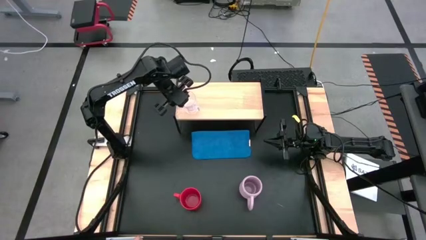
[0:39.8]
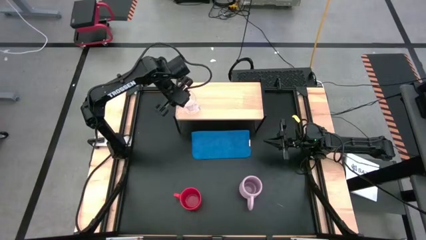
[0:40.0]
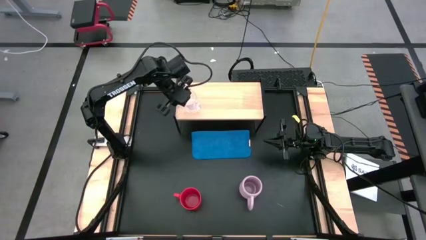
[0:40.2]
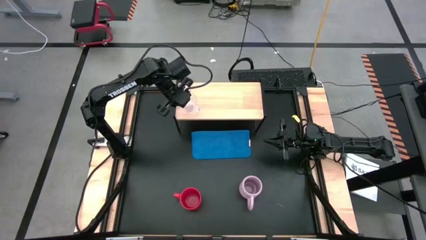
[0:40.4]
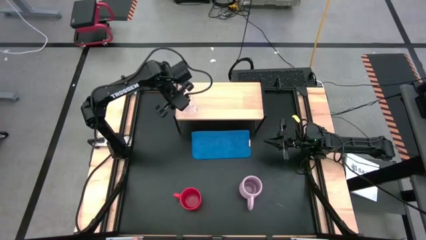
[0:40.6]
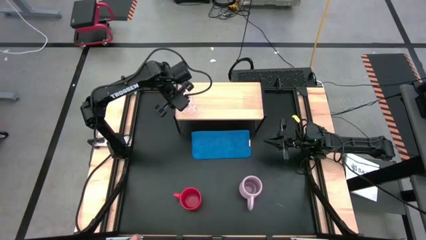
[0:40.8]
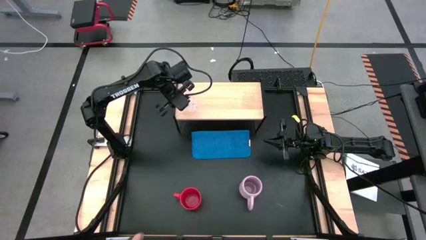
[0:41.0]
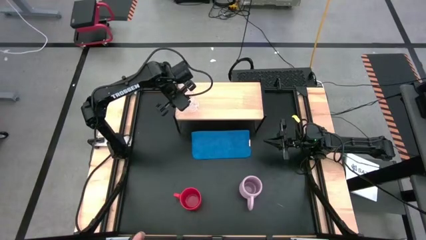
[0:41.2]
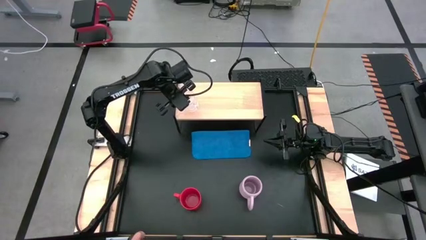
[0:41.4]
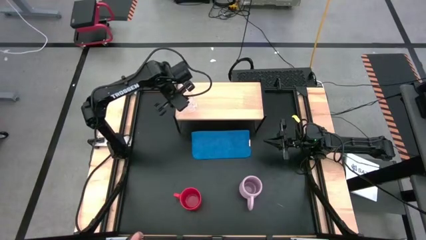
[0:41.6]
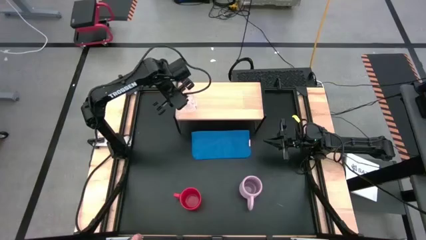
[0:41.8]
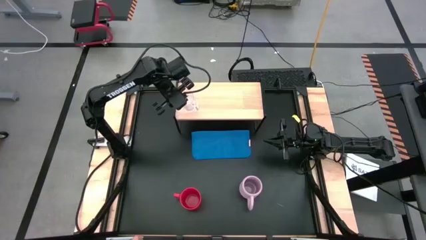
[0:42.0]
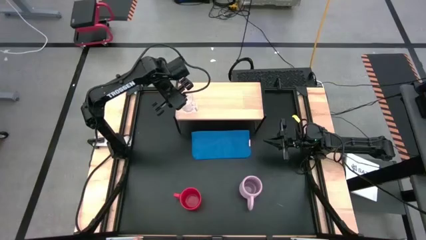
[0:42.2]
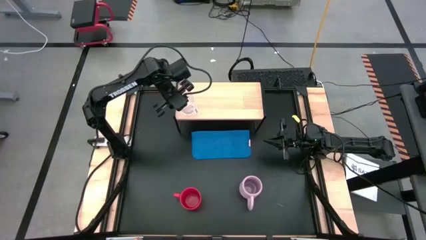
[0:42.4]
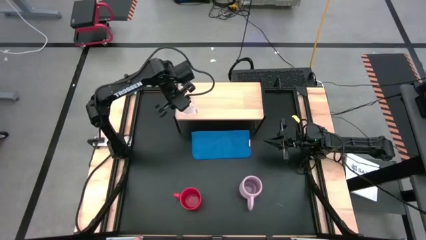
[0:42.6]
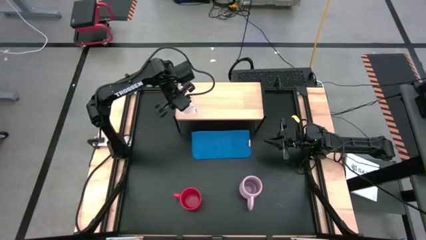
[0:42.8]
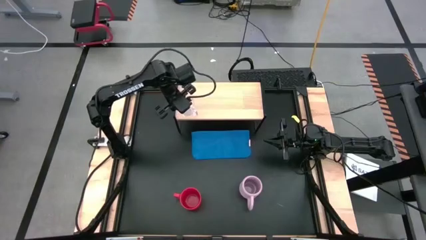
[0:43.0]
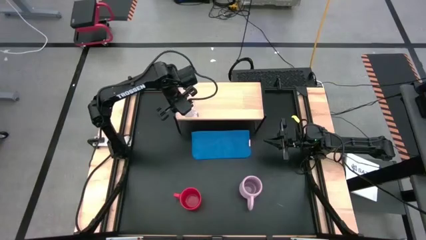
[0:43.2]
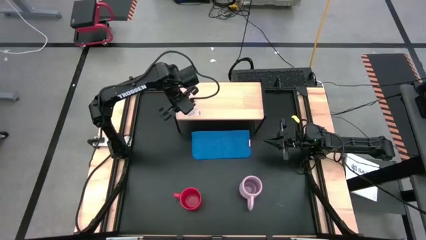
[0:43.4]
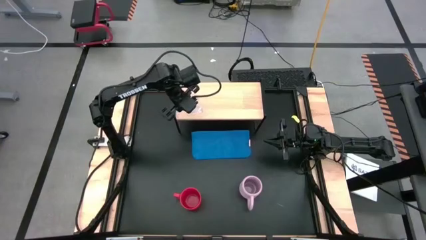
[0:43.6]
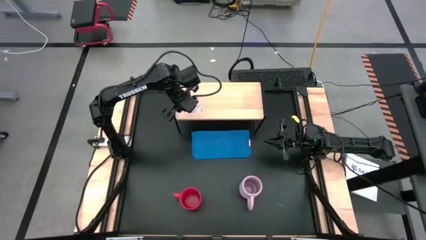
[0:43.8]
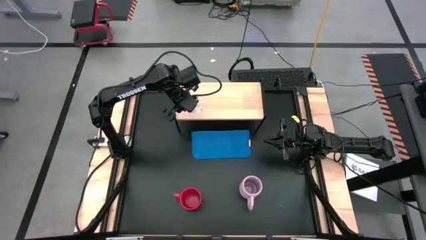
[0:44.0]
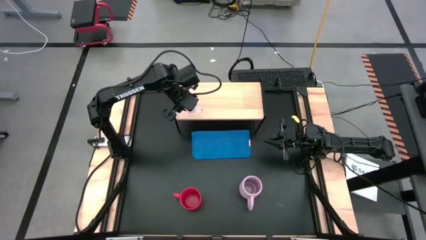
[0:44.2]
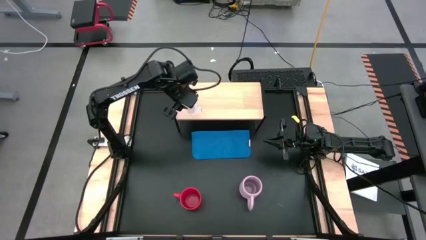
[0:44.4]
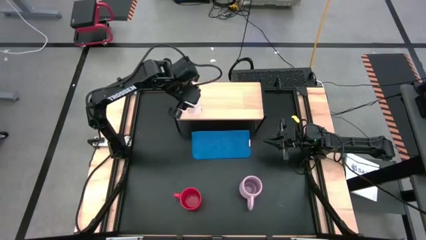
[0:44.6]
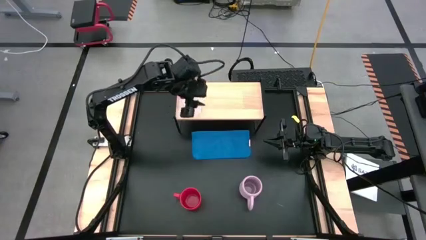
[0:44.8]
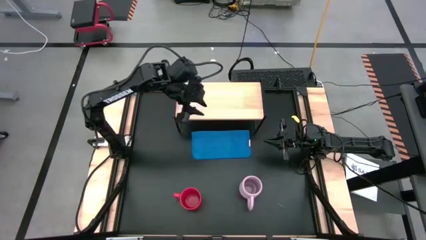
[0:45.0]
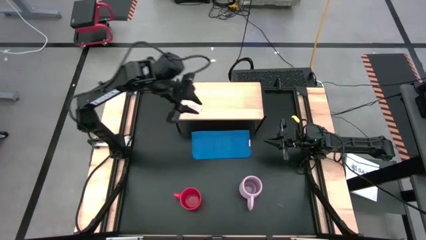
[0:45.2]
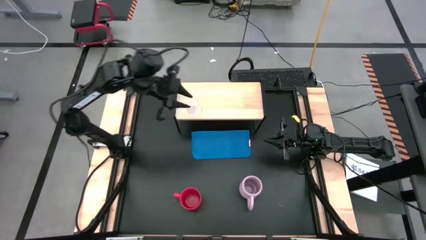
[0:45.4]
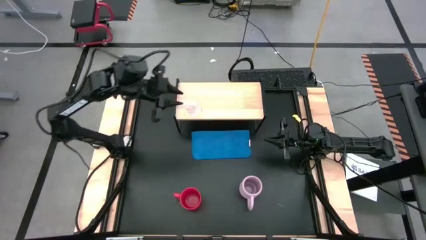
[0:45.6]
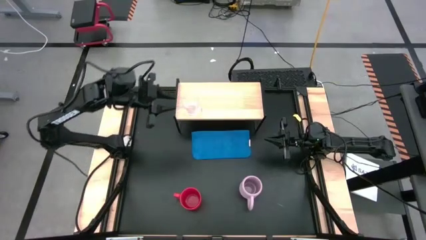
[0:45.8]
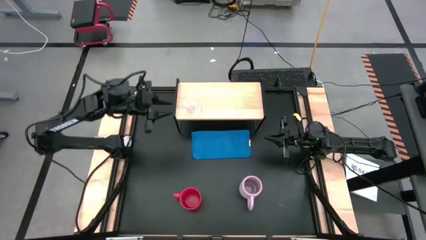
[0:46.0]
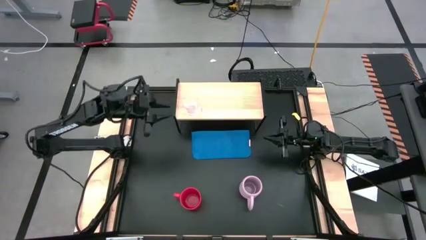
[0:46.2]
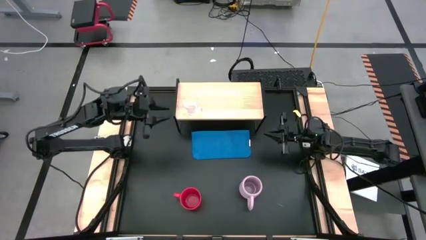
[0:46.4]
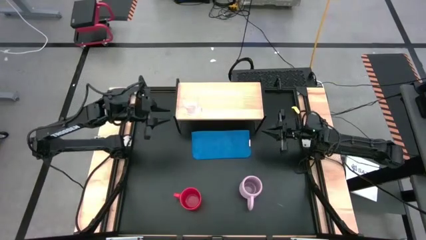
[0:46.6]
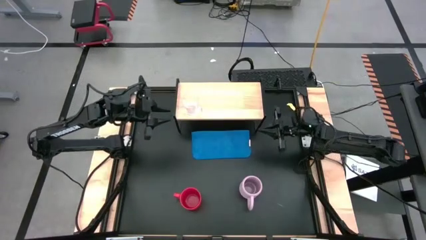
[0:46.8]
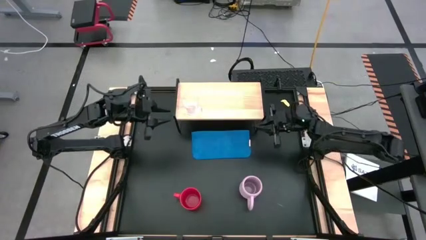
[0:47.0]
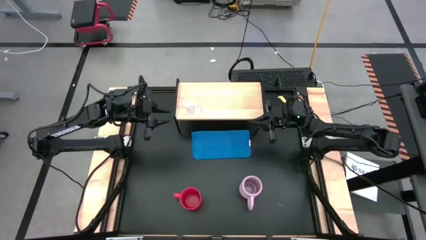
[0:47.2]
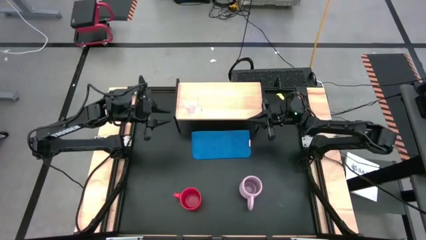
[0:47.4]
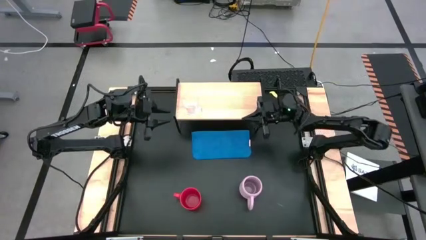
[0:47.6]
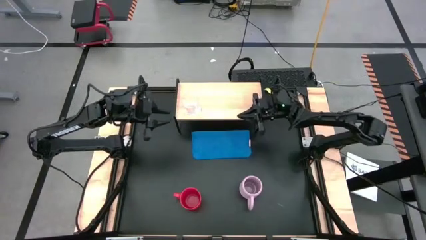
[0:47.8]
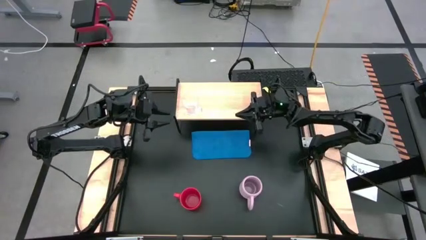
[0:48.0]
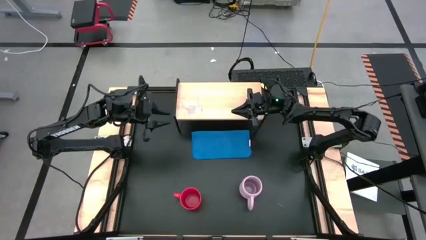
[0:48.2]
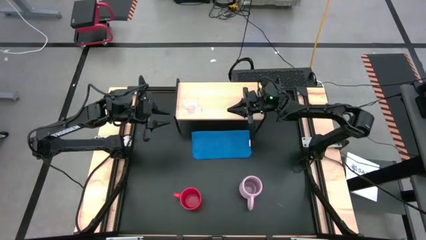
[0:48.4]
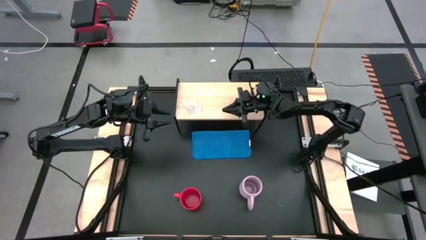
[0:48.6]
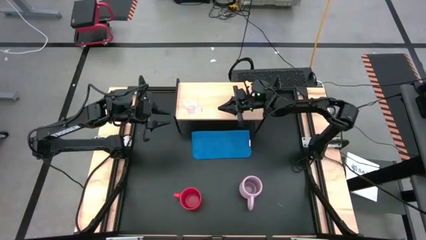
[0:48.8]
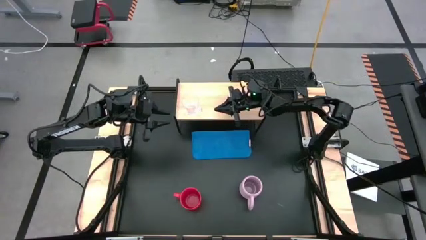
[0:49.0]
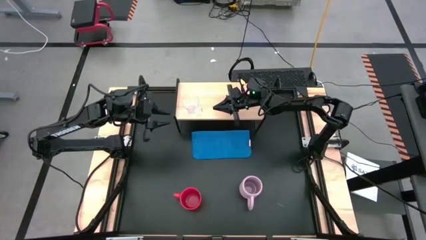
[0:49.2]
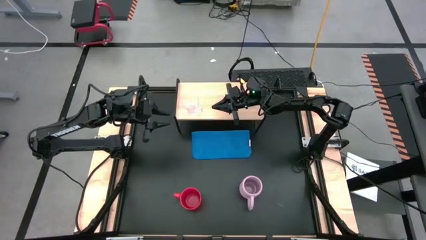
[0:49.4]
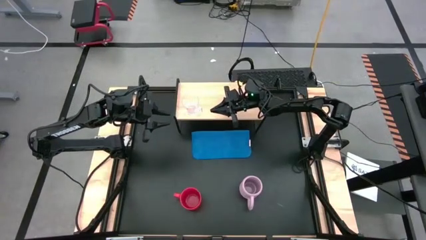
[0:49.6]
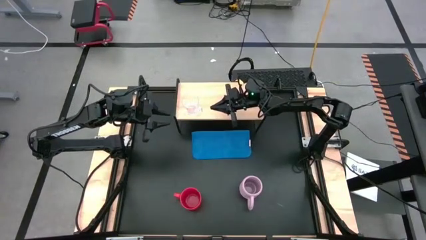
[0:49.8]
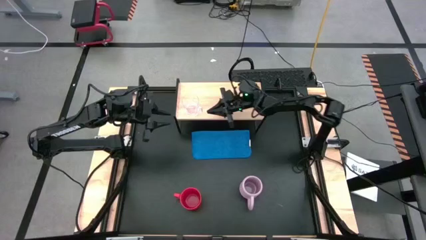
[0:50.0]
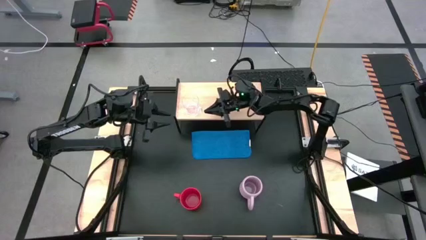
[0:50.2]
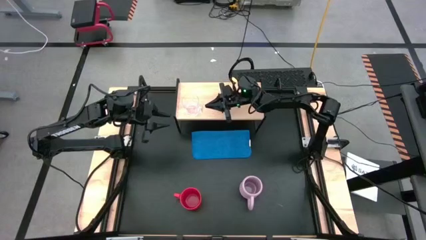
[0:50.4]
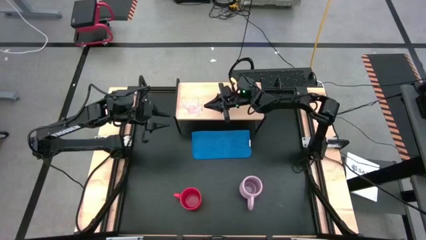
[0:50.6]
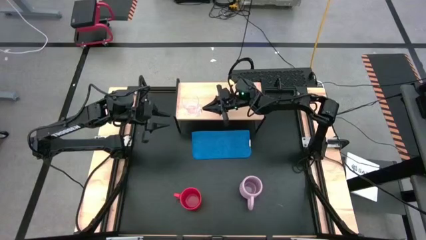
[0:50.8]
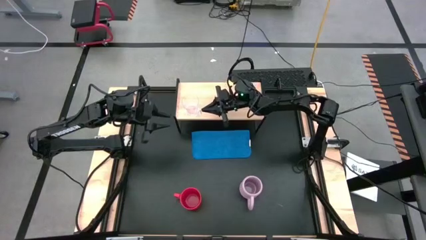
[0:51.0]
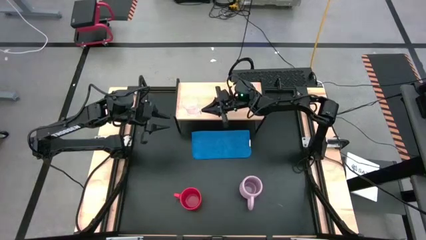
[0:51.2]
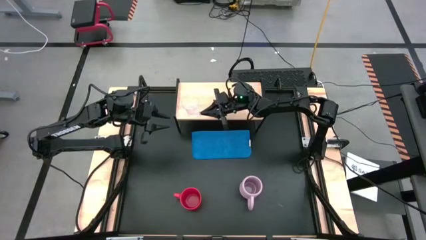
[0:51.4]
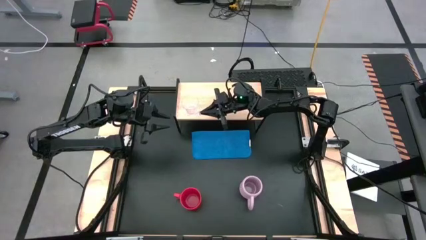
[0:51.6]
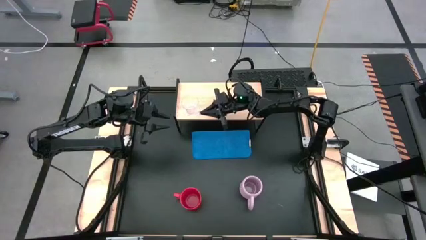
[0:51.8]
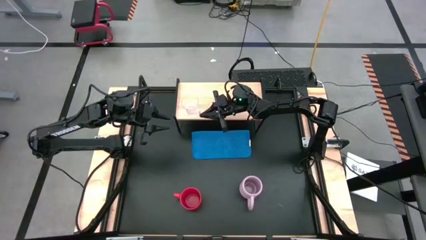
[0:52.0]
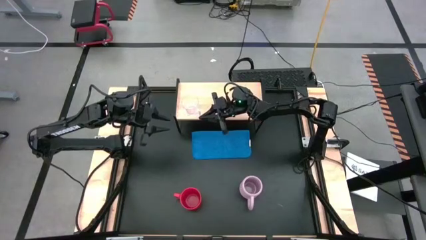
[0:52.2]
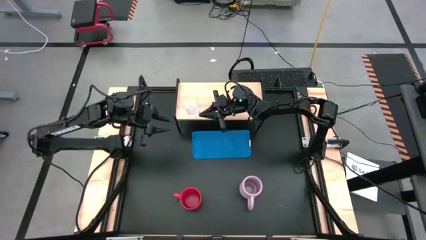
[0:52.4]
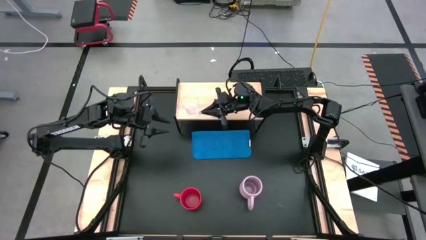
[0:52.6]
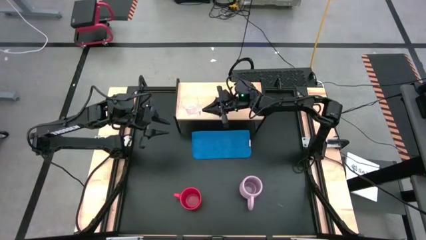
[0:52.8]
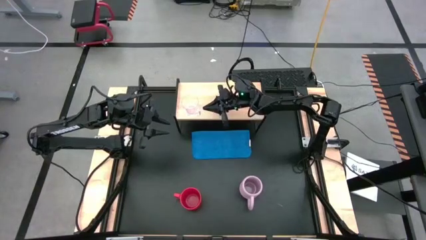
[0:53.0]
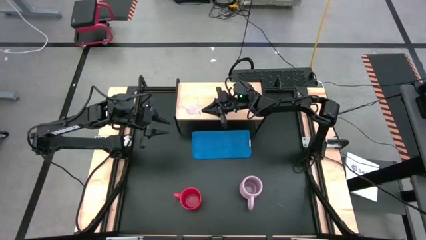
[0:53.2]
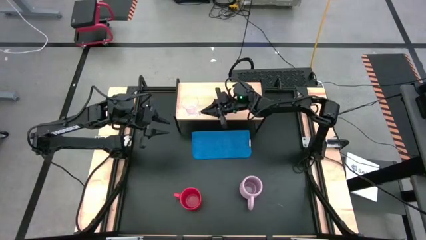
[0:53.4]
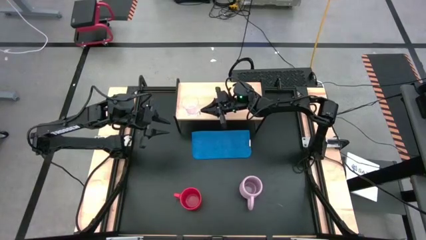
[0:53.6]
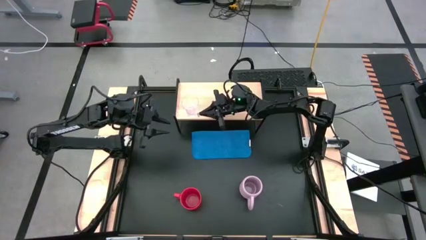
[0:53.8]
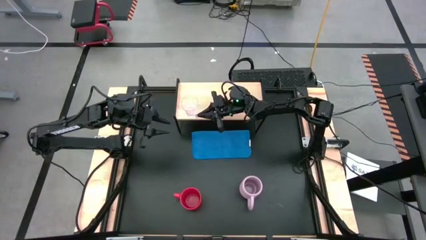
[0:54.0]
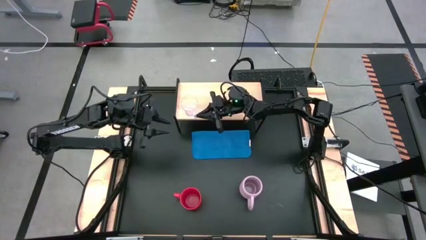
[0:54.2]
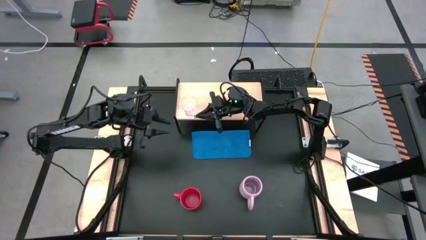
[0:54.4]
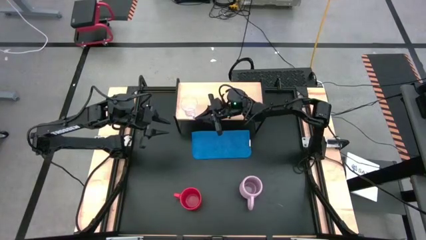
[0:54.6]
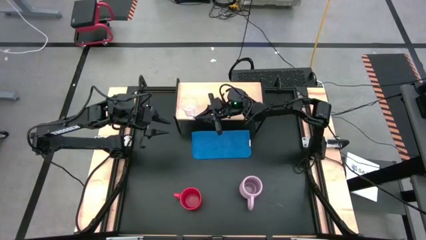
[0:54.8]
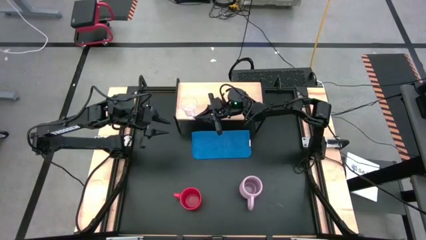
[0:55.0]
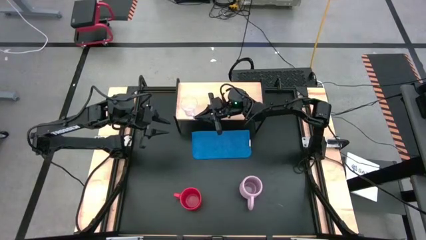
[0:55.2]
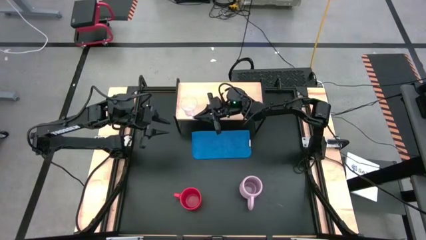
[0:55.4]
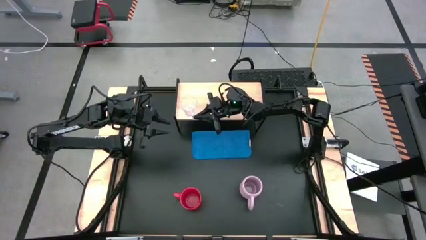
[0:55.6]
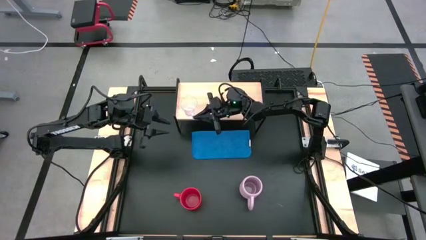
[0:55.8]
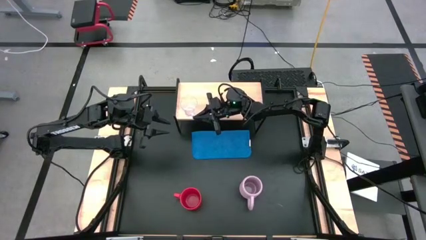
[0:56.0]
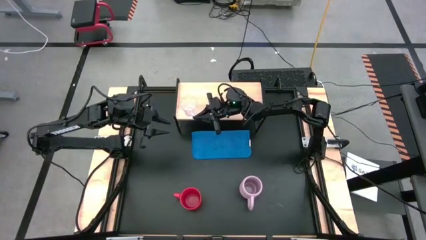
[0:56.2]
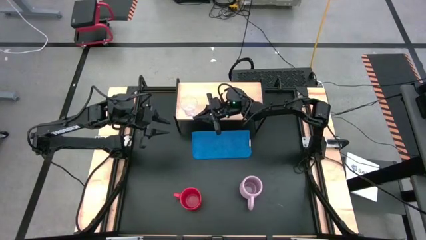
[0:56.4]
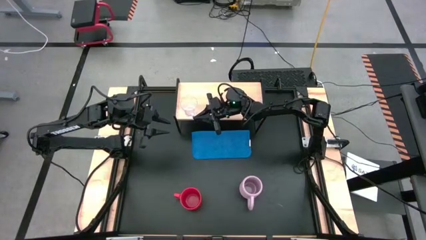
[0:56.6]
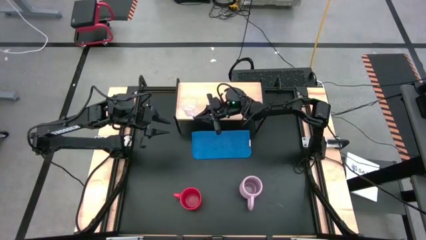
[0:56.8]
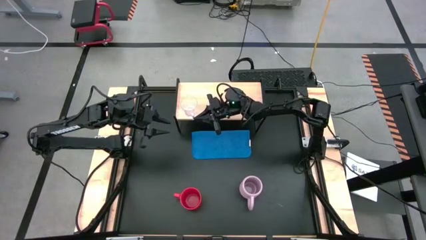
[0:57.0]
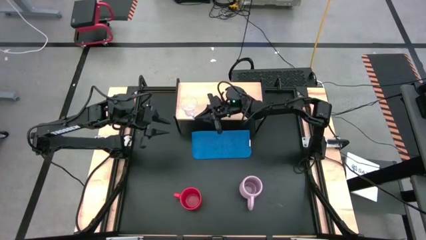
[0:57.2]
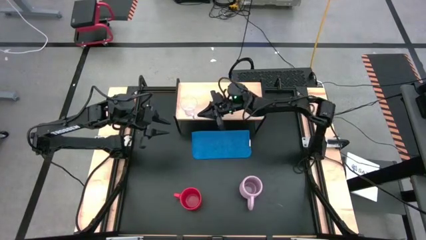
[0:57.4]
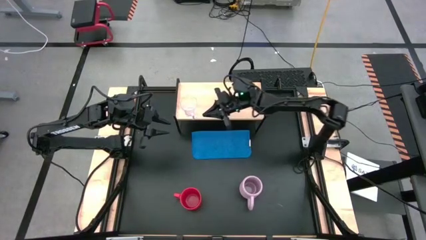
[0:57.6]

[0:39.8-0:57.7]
Task: Stack small to large cups/mugs on shelf
Put the glass mug on the shelf
